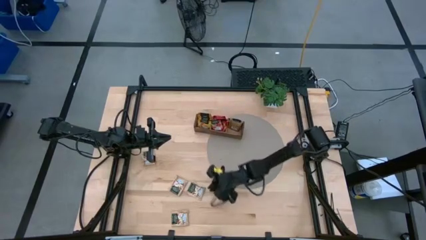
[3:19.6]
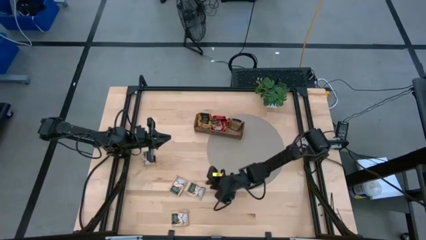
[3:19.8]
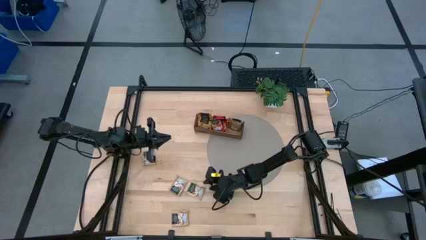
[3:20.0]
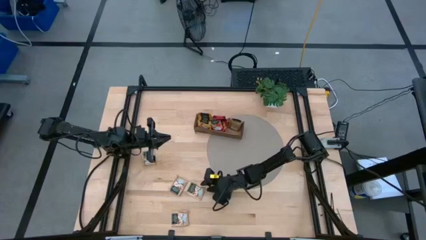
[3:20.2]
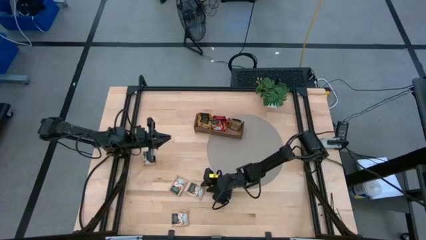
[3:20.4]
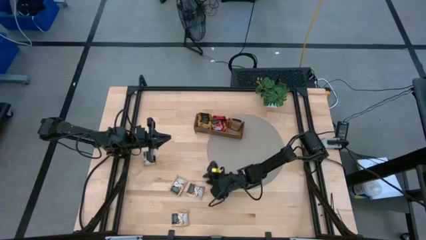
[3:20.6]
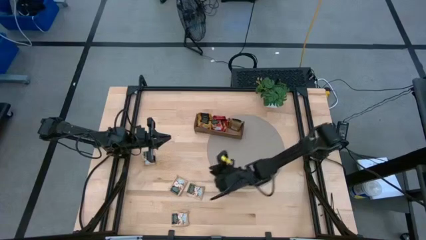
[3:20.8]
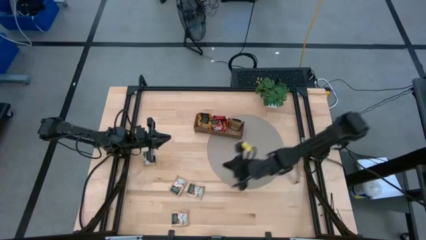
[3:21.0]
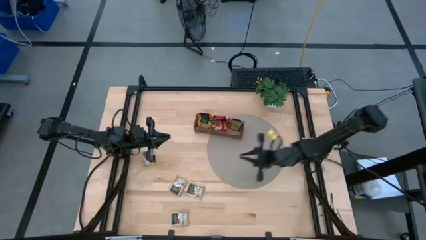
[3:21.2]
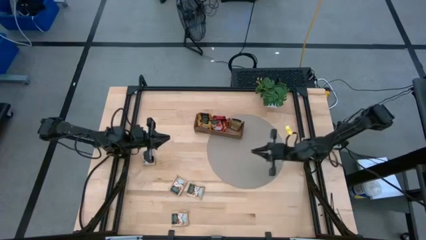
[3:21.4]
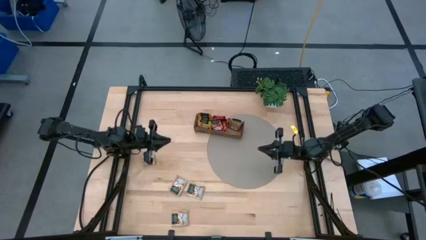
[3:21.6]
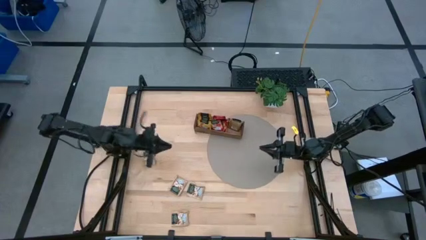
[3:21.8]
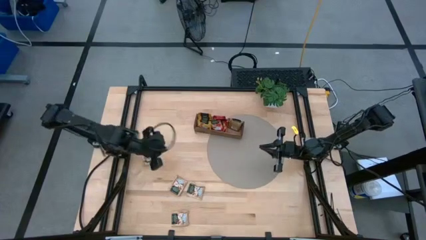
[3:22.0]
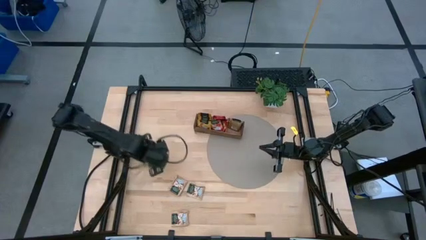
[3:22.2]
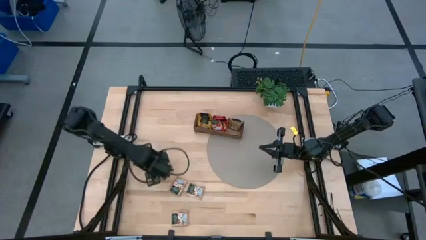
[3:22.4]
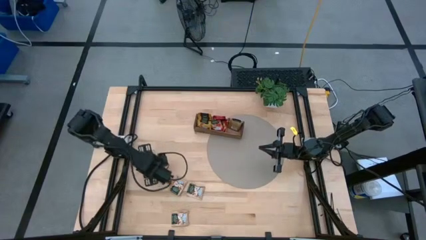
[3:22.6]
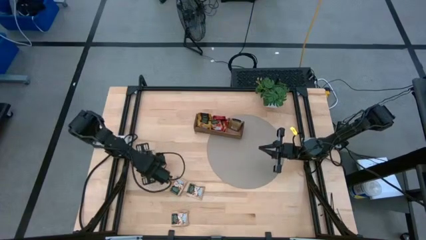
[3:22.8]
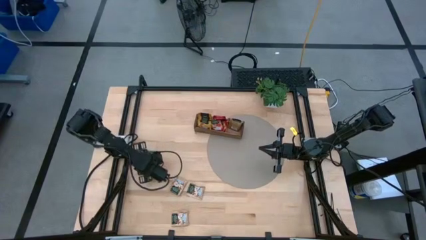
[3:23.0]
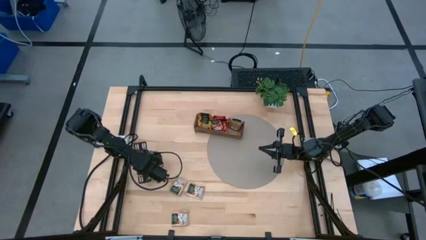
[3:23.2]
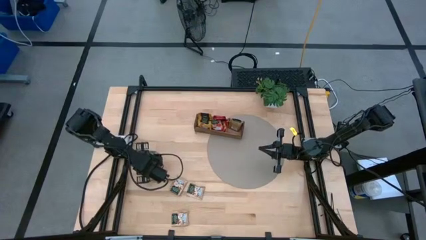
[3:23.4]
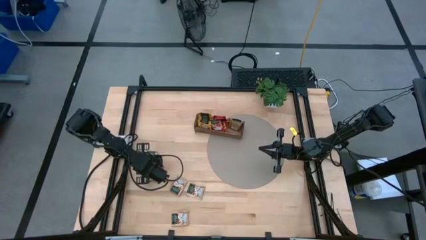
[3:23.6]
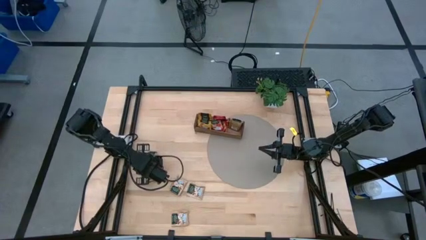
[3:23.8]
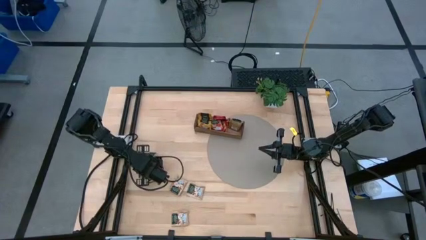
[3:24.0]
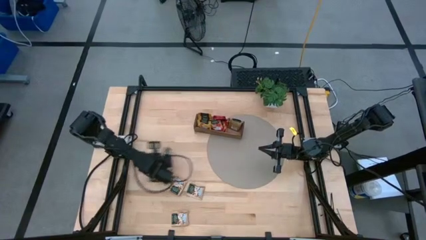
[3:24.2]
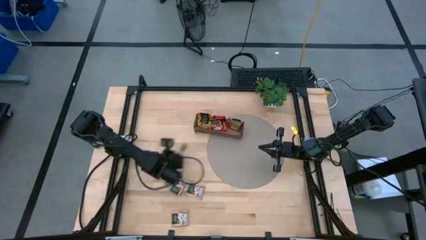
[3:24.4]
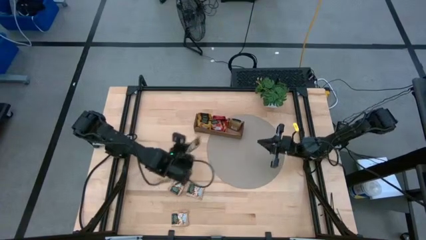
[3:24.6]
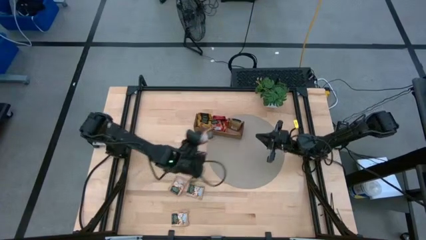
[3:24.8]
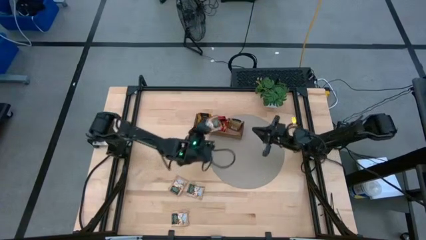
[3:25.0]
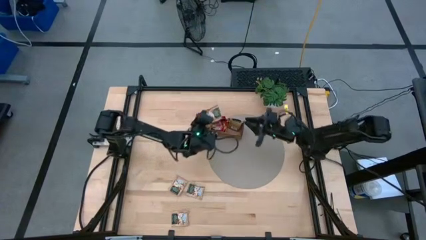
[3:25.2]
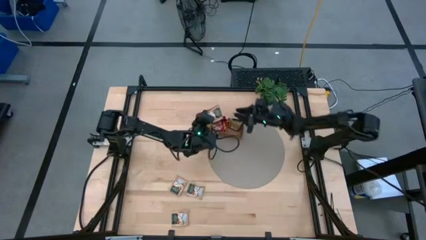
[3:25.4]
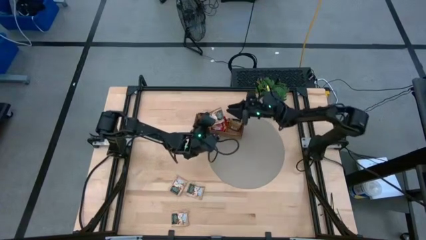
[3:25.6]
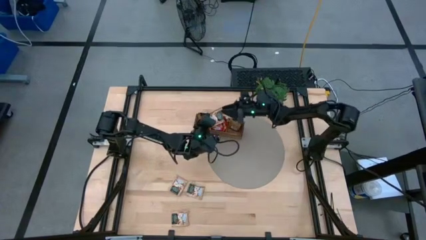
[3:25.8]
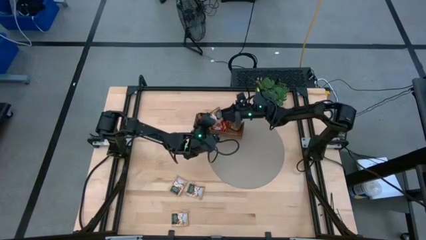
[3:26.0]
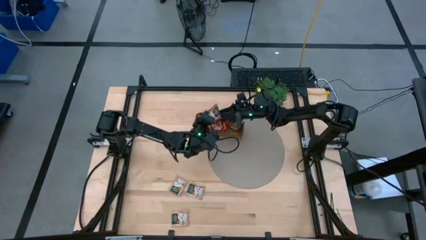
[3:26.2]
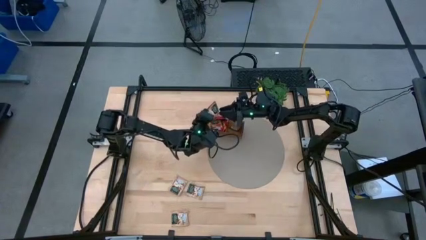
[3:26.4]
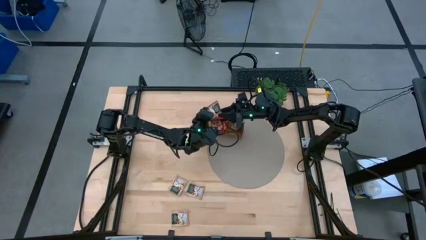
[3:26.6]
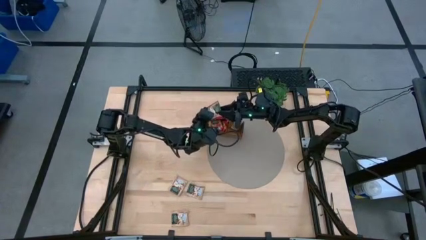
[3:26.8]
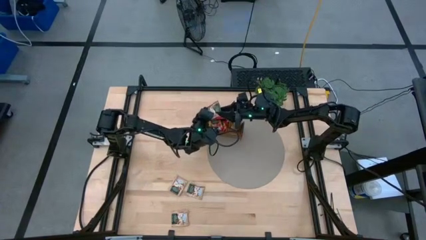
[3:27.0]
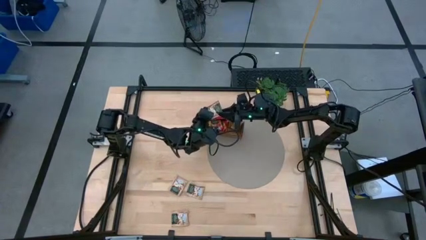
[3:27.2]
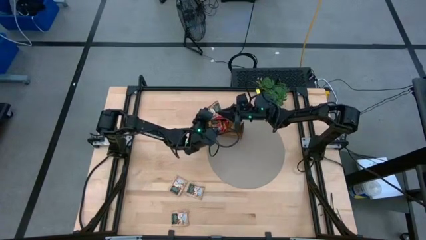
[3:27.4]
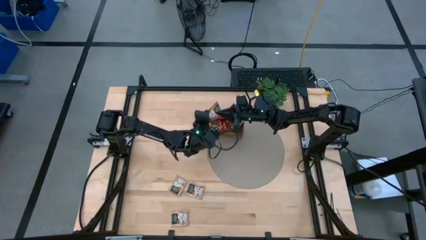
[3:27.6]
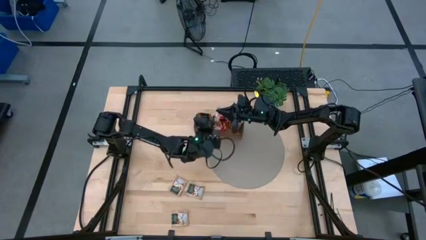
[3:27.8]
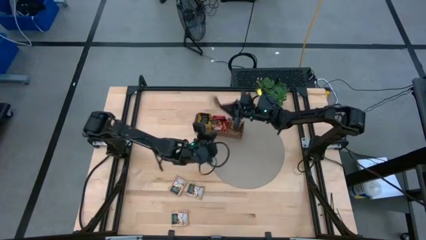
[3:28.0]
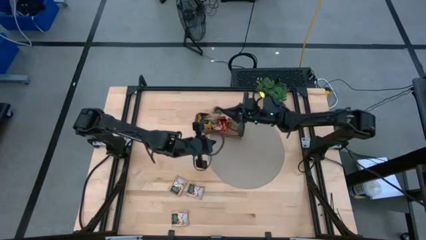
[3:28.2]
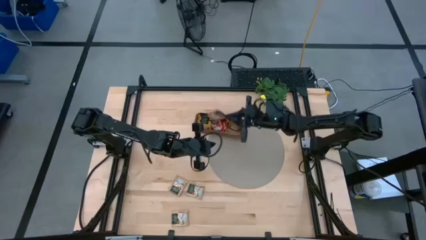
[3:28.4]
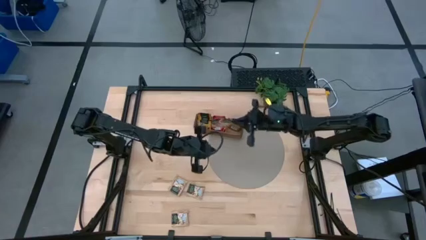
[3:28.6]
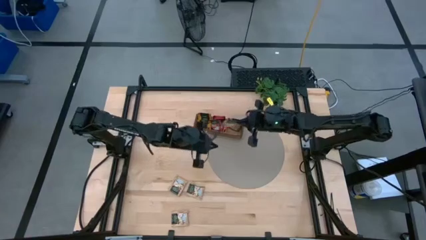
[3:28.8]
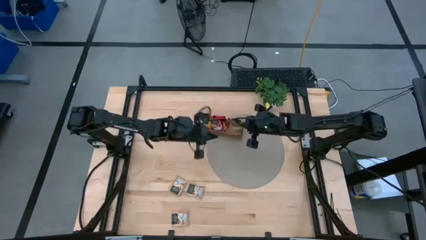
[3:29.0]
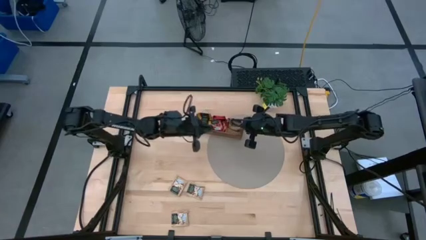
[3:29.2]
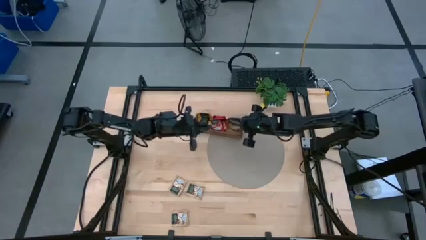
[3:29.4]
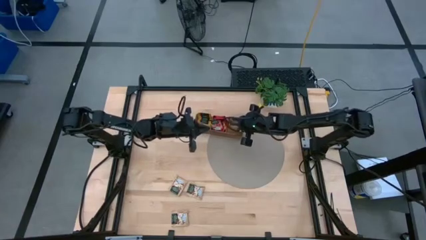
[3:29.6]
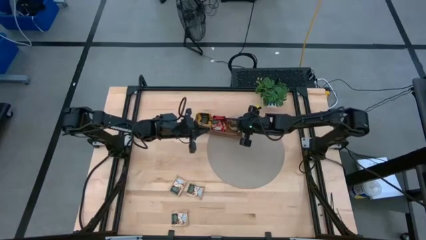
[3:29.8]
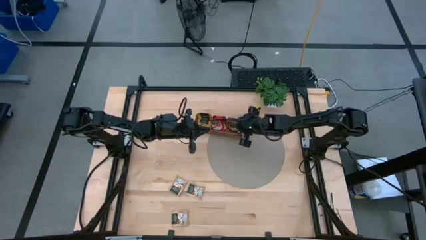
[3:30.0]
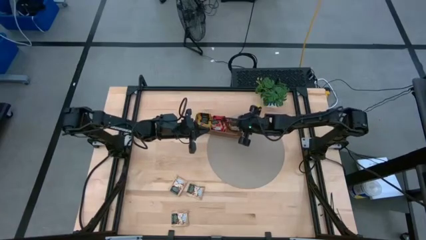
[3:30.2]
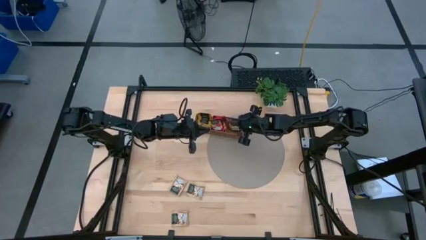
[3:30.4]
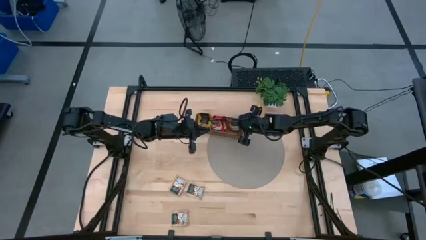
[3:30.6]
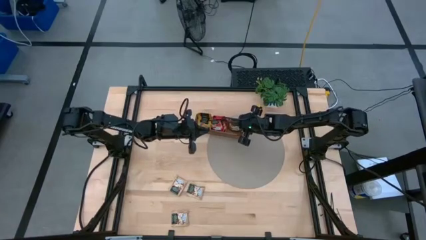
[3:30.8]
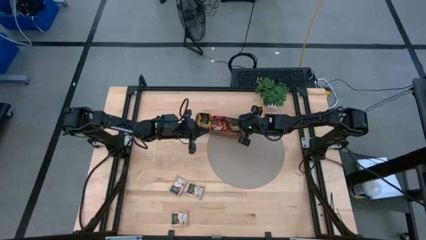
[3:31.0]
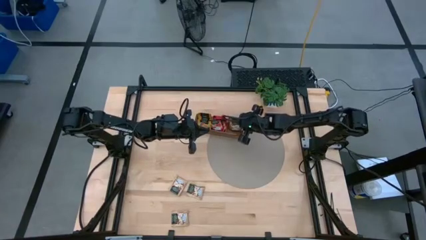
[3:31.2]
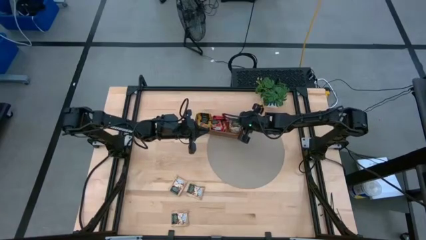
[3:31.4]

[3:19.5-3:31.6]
Task: Pick & Place Tea
Put the brown tea bag into the right section of the wooden organizer
